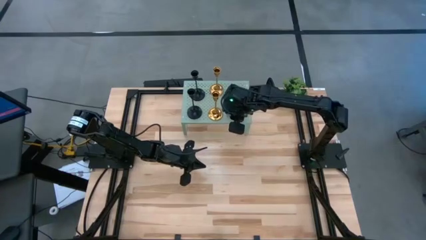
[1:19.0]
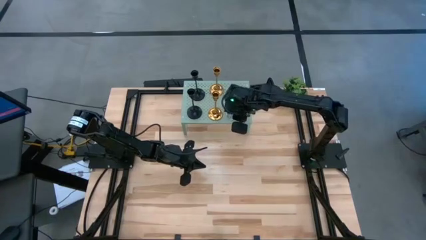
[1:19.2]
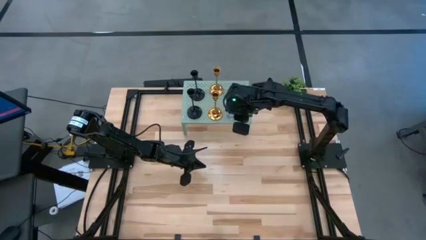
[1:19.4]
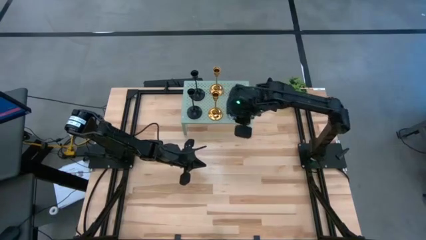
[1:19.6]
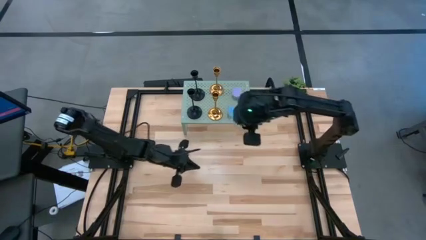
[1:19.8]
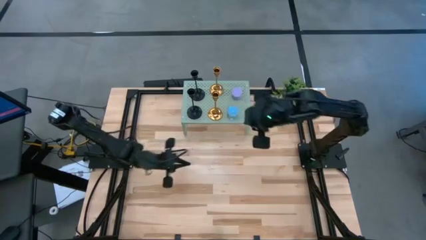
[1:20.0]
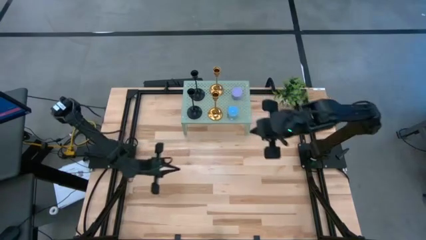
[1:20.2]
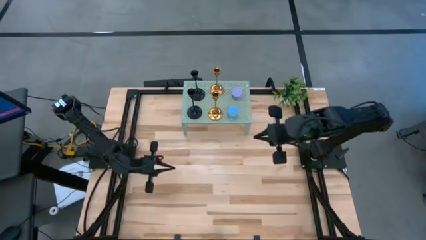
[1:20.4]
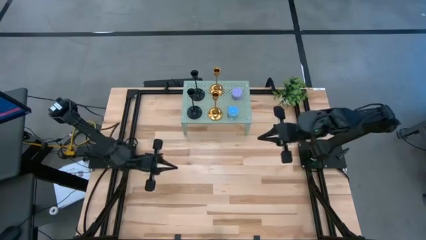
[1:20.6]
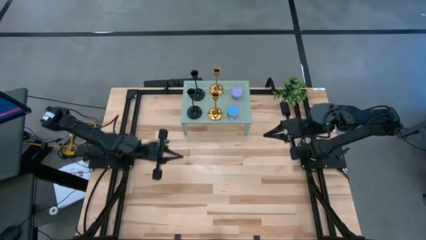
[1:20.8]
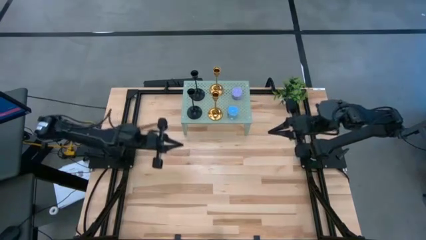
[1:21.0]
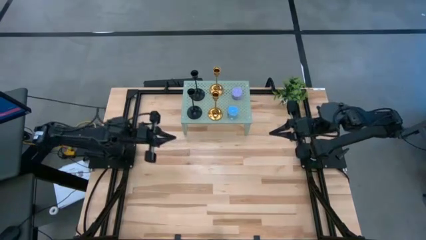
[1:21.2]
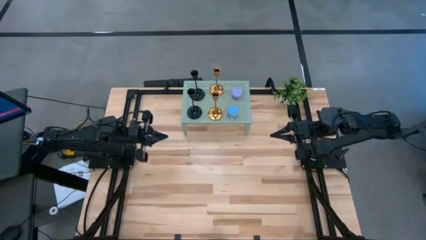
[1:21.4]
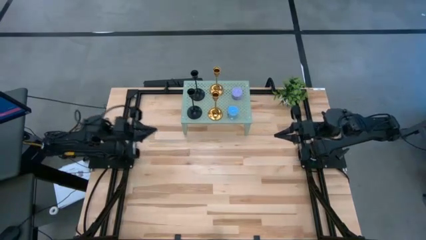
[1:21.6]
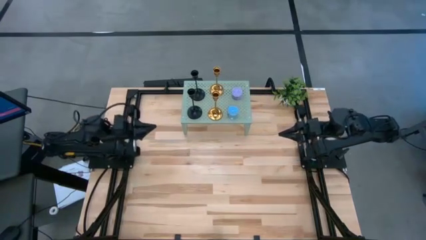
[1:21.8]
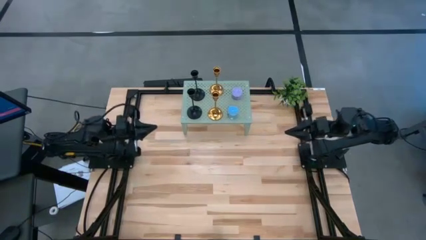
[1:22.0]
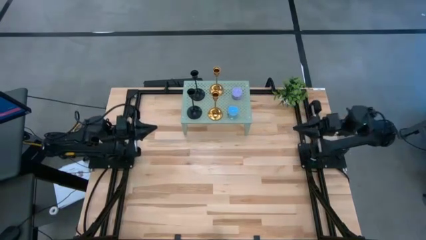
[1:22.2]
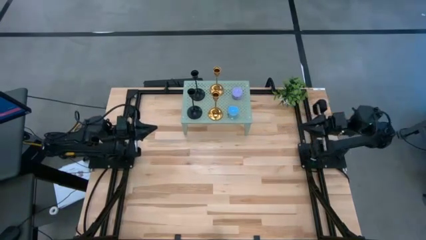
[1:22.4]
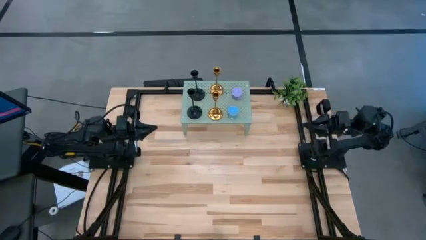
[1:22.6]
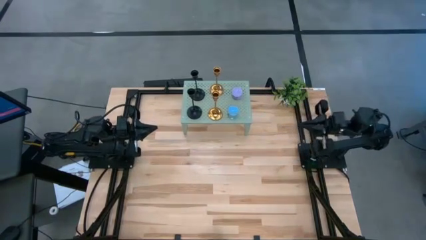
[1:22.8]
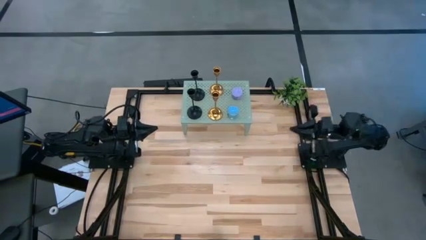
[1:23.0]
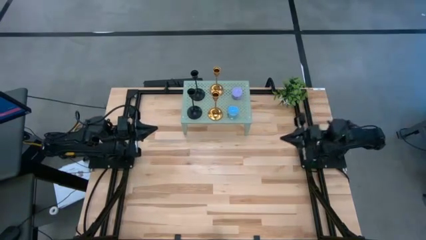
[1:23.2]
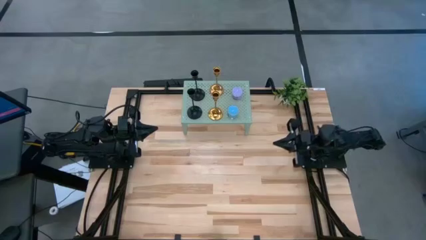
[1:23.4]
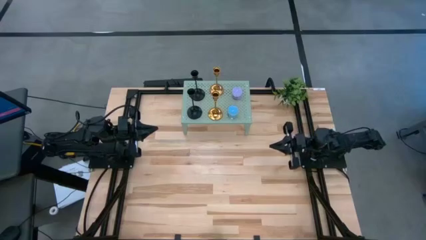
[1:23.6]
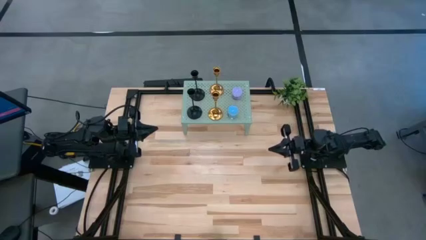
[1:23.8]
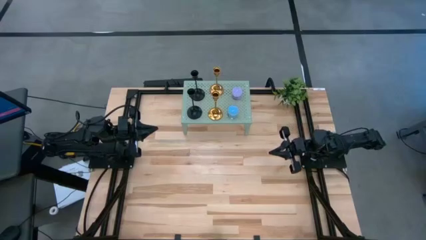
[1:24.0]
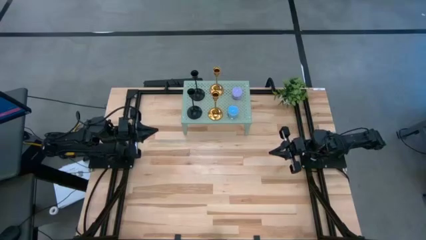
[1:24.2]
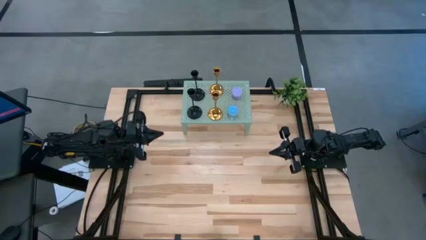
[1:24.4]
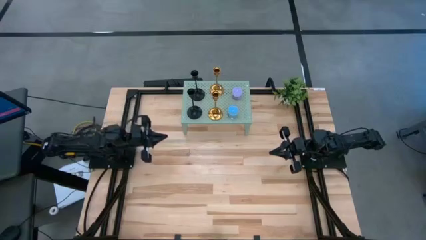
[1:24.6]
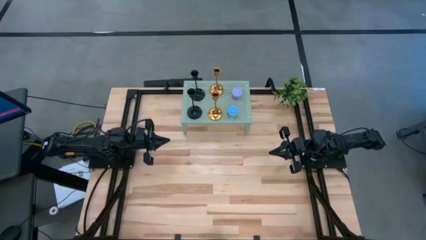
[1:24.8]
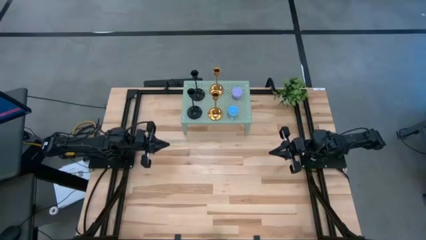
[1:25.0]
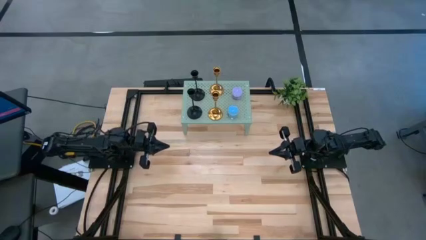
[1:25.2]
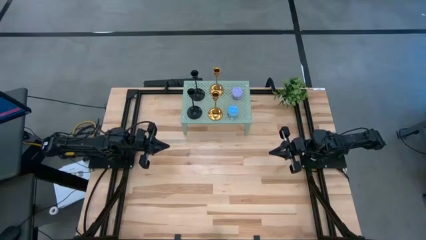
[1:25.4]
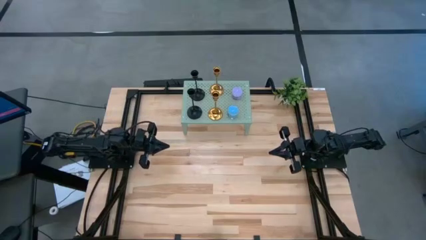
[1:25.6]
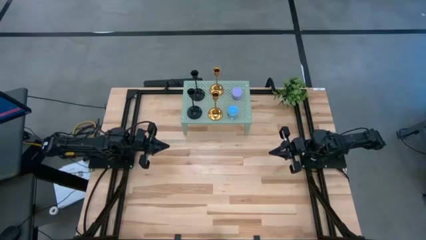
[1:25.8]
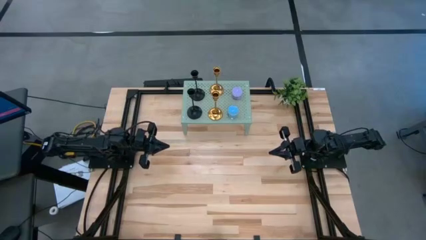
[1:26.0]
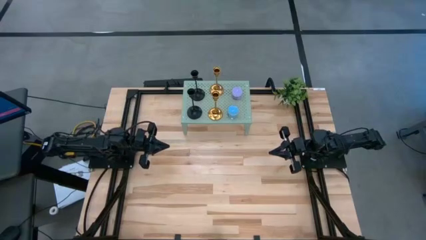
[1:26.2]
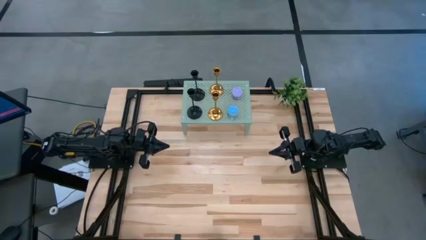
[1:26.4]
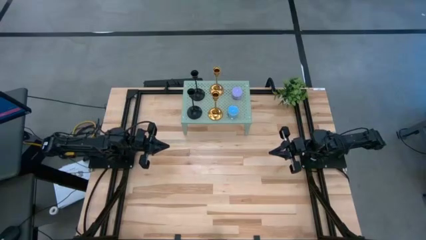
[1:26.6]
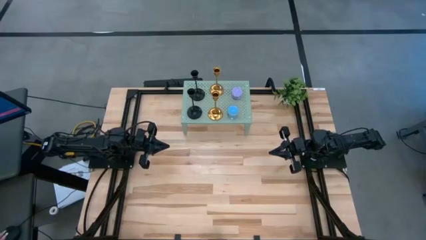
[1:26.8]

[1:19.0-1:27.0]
Task: Pick & Place candle stick holders
Return to Home Position

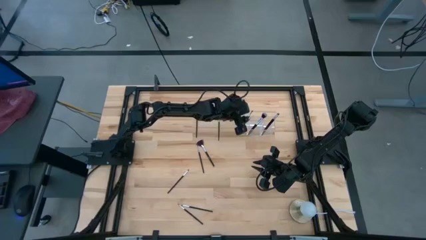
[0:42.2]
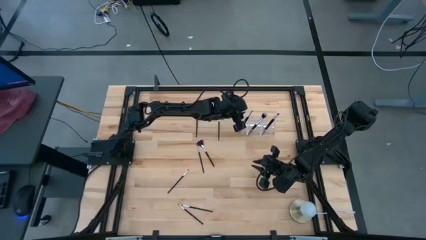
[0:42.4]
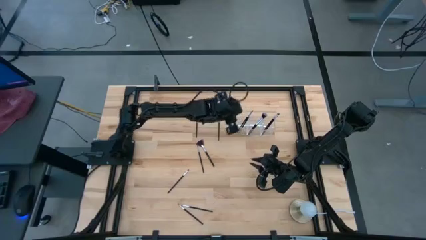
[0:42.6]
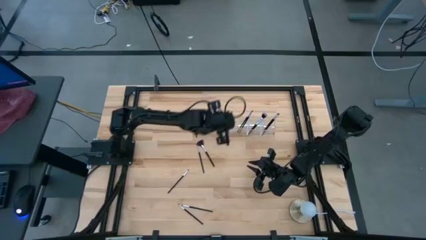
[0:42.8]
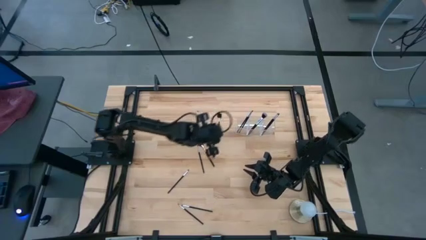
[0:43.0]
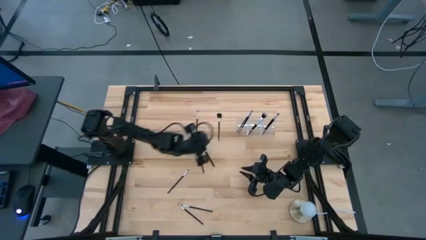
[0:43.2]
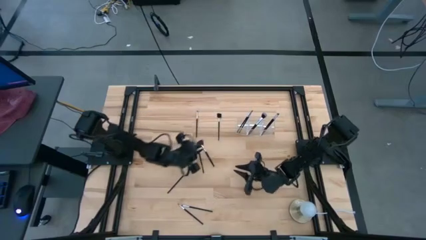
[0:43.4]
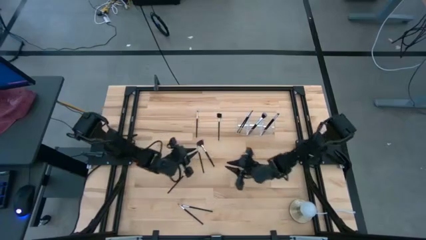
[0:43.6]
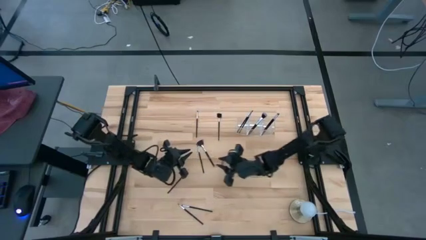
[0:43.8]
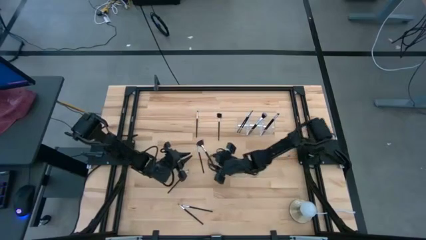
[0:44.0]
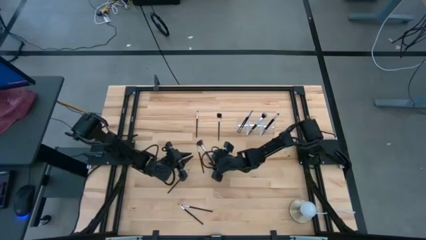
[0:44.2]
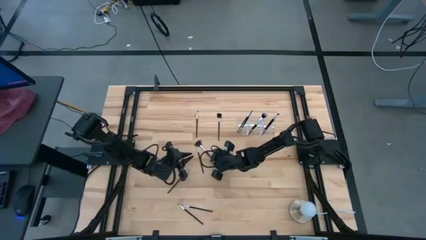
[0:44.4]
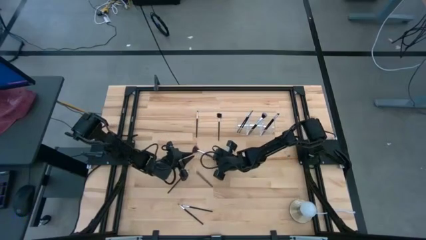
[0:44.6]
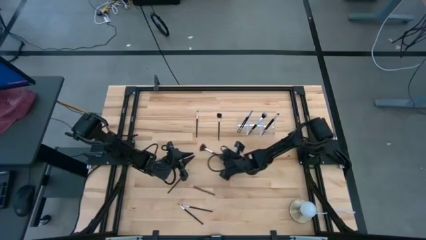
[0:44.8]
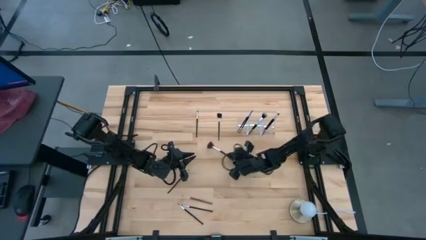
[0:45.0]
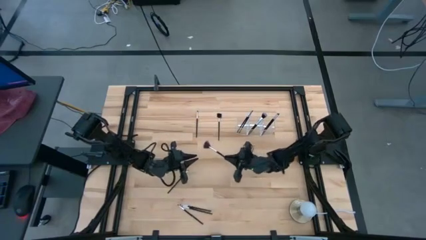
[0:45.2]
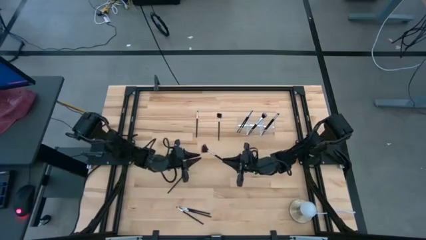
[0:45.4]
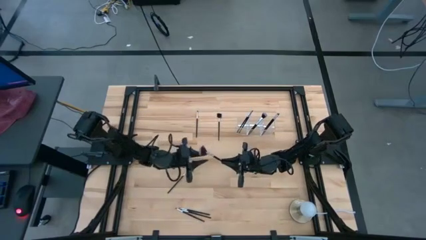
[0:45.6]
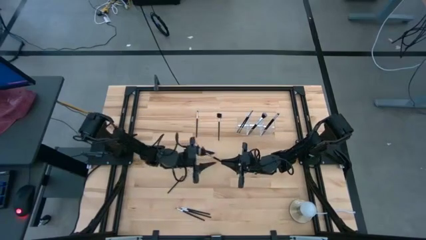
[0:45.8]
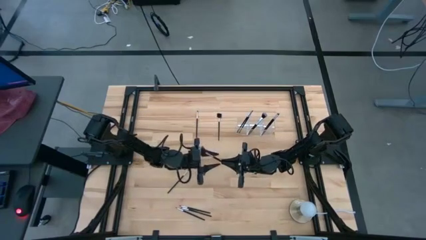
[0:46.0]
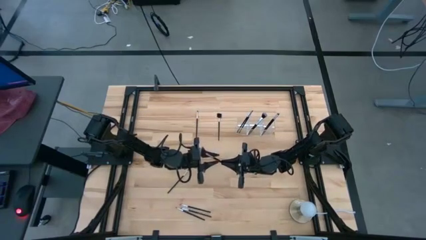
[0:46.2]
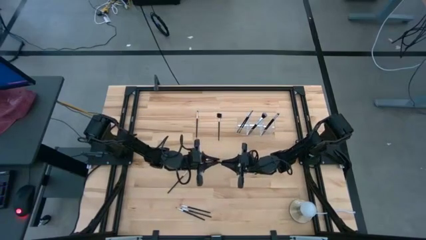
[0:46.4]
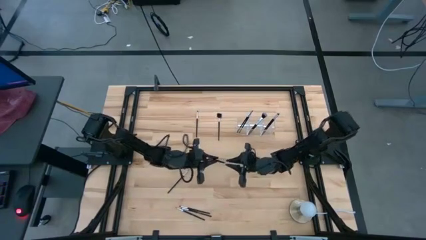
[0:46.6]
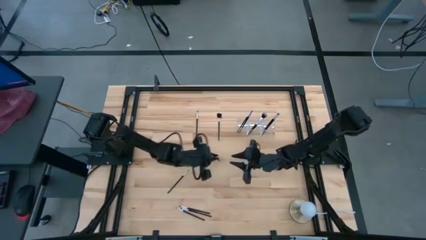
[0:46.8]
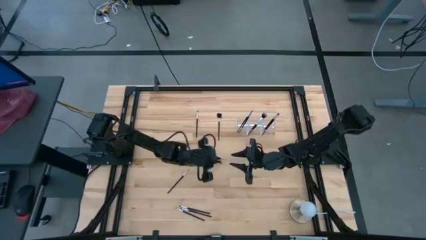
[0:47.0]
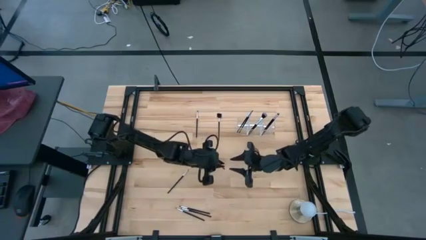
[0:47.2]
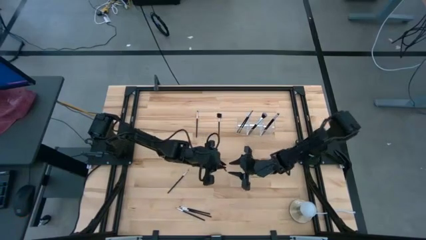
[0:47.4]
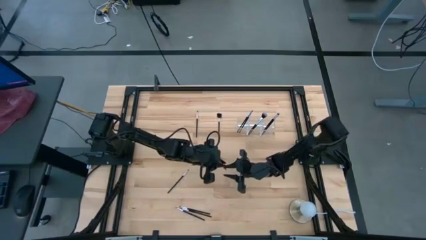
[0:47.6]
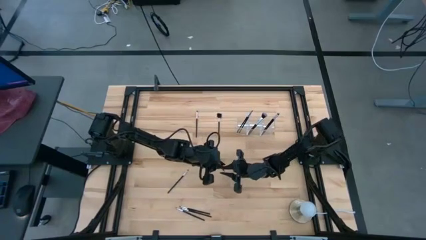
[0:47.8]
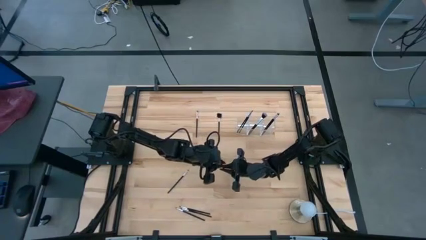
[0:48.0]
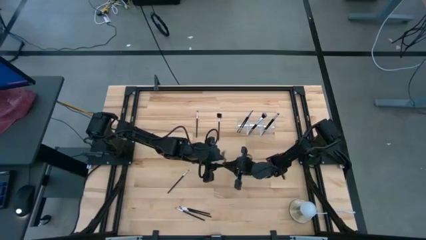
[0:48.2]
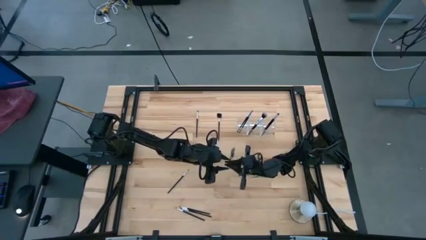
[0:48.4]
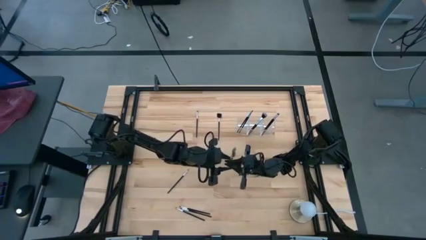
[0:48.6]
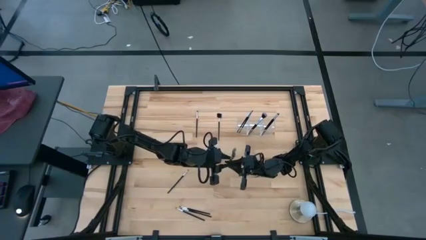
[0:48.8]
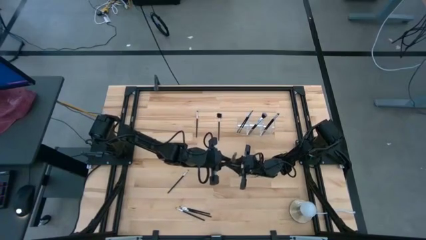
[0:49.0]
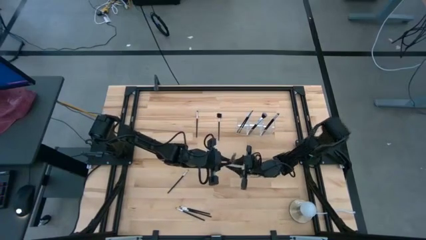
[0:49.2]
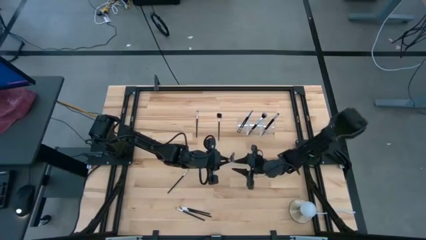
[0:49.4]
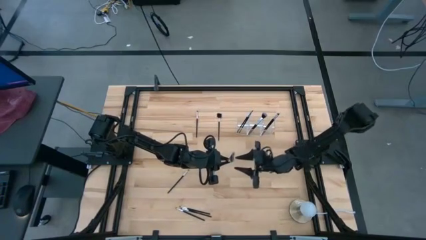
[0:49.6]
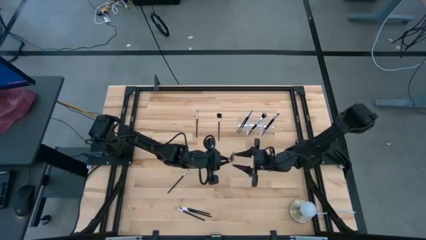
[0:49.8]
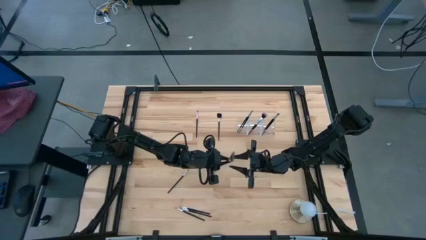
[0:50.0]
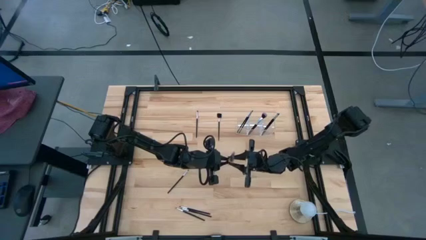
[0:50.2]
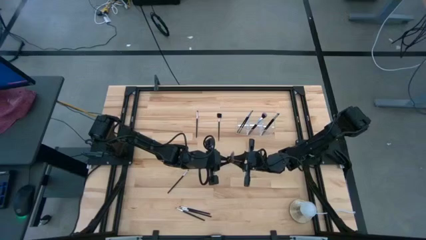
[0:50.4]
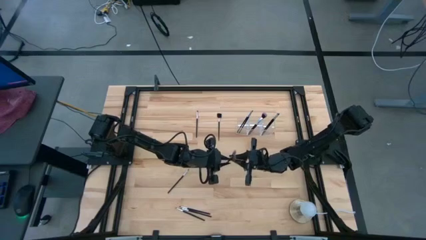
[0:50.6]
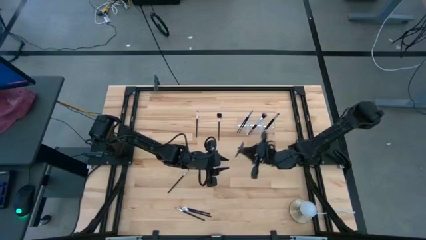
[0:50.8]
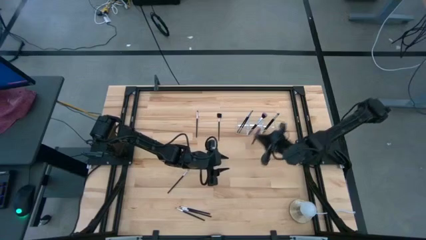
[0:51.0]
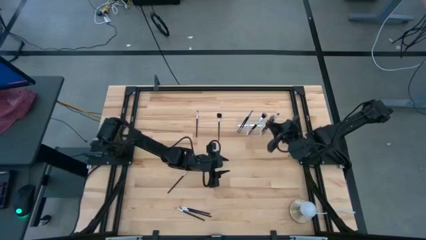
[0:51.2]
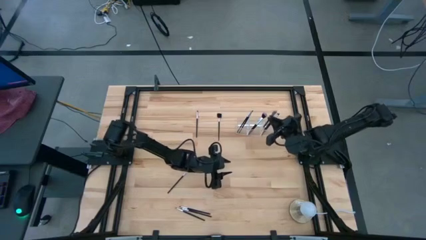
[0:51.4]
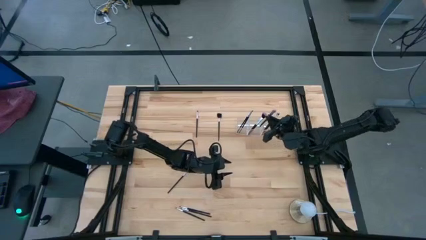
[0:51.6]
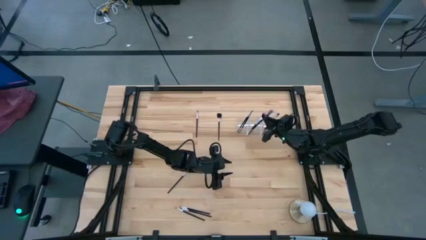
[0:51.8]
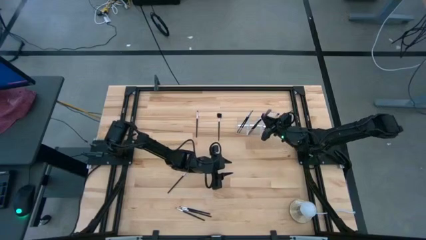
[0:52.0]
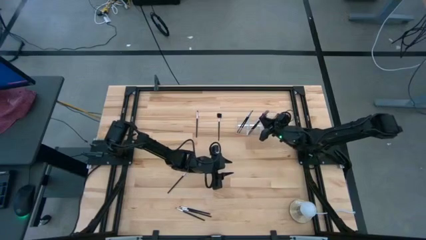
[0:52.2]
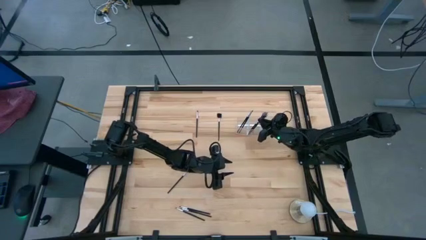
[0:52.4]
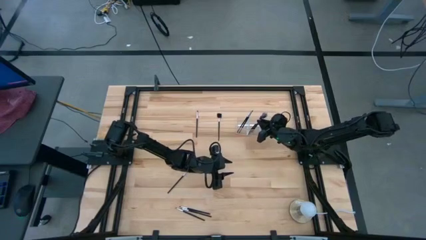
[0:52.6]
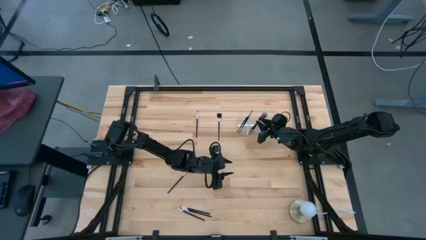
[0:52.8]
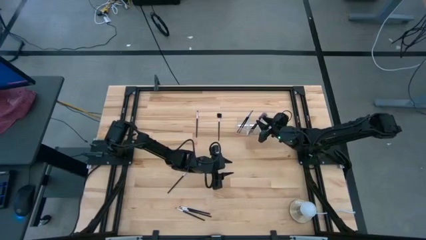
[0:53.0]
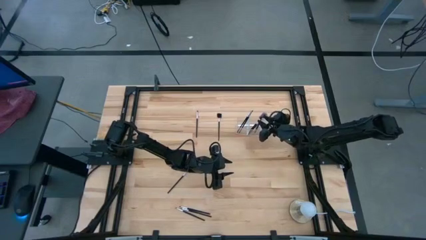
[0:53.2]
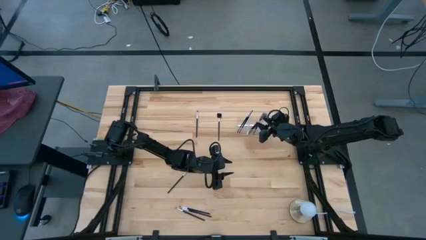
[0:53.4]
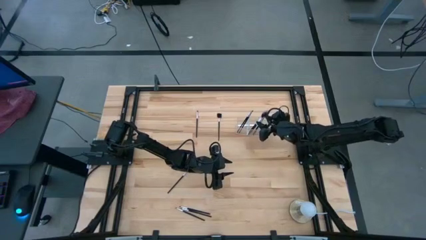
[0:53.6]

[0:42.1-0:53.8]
Task: Put items in baskets/containers
Put the black highlighter brush into the transparent organizer
